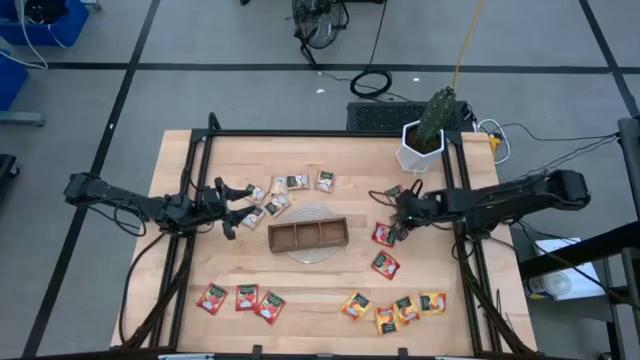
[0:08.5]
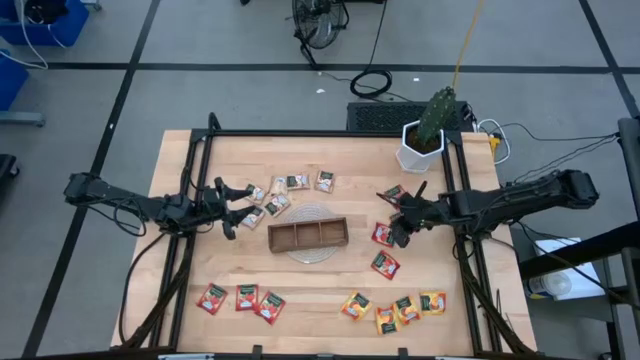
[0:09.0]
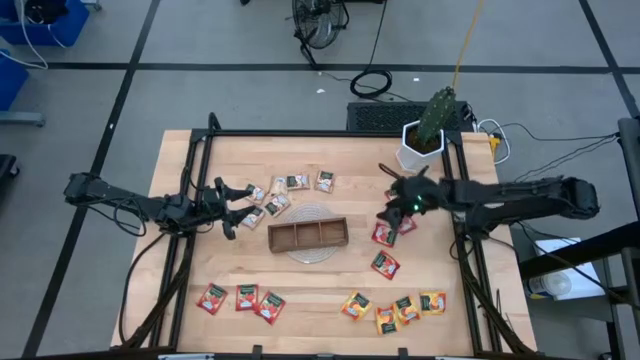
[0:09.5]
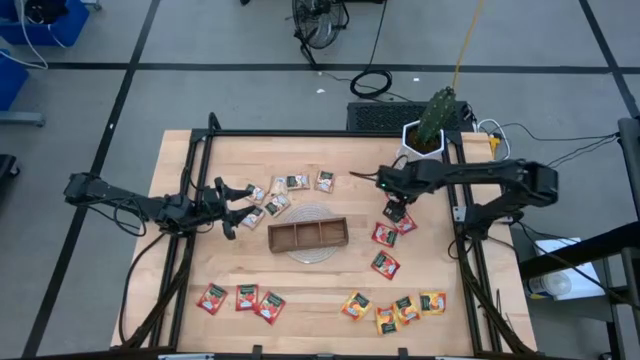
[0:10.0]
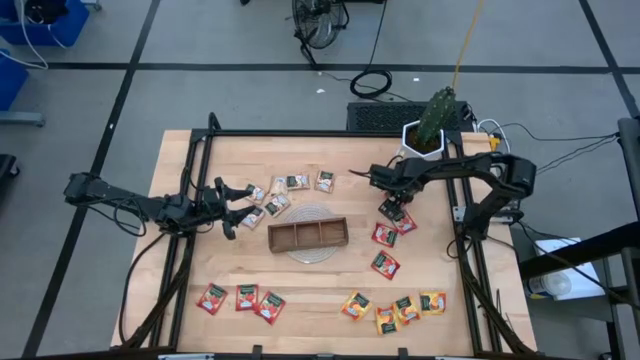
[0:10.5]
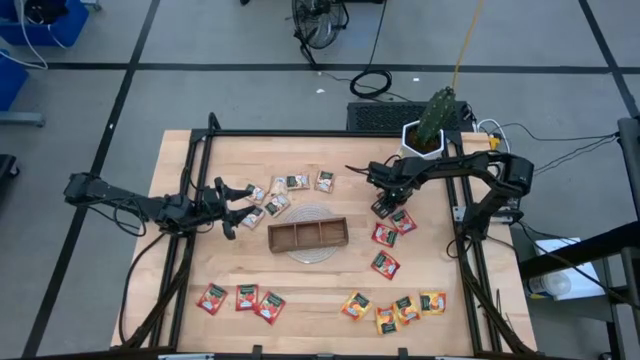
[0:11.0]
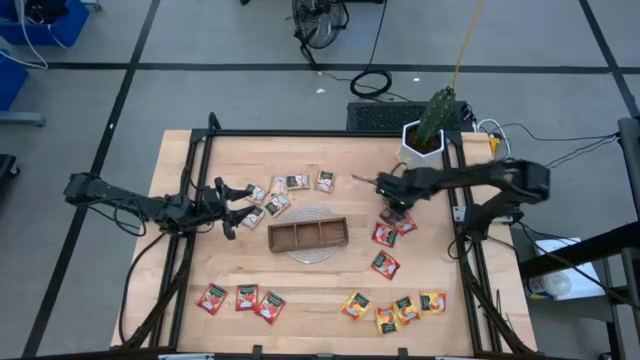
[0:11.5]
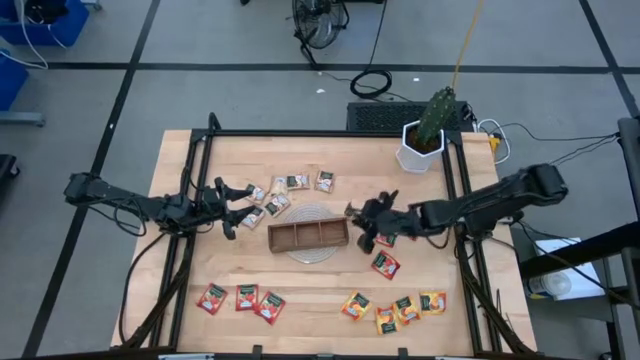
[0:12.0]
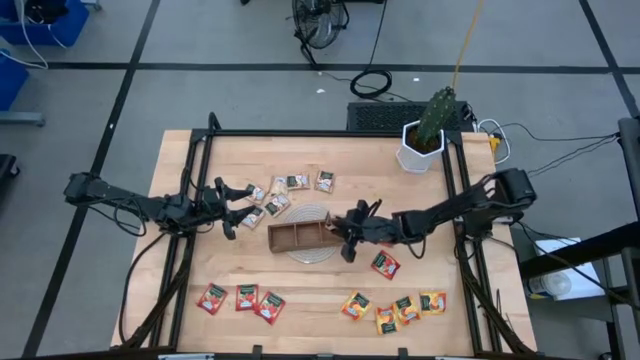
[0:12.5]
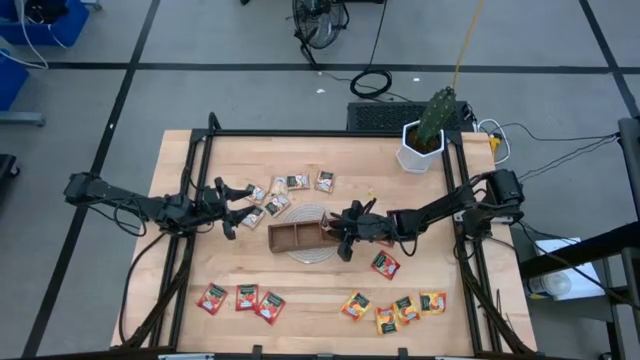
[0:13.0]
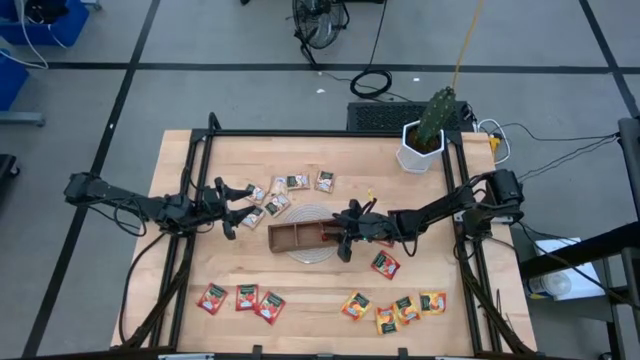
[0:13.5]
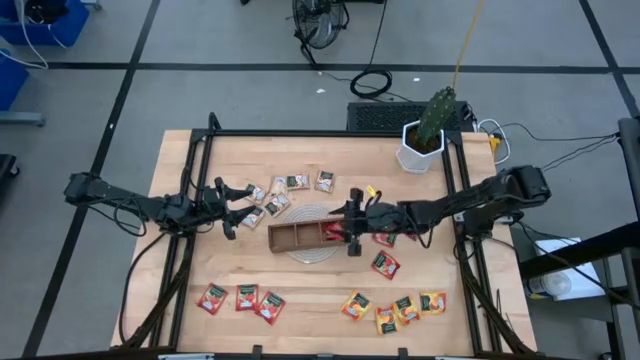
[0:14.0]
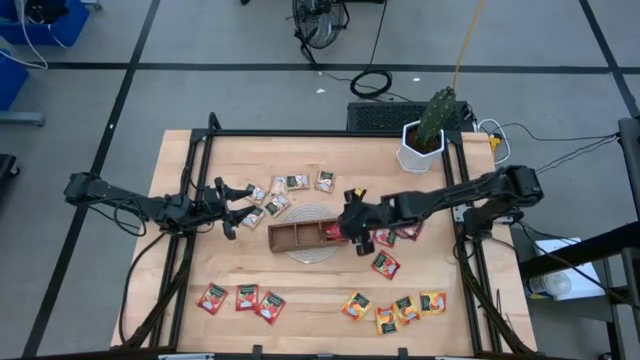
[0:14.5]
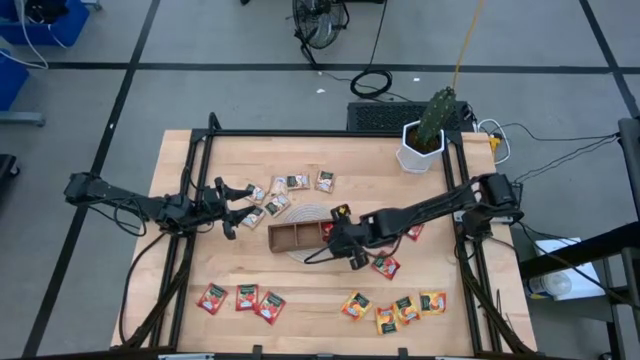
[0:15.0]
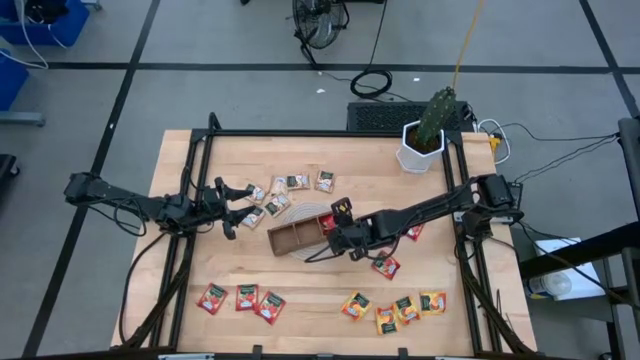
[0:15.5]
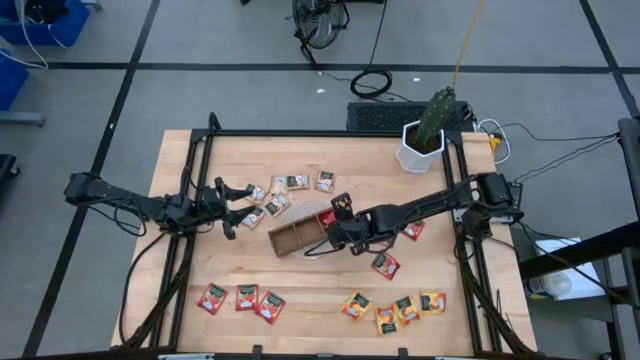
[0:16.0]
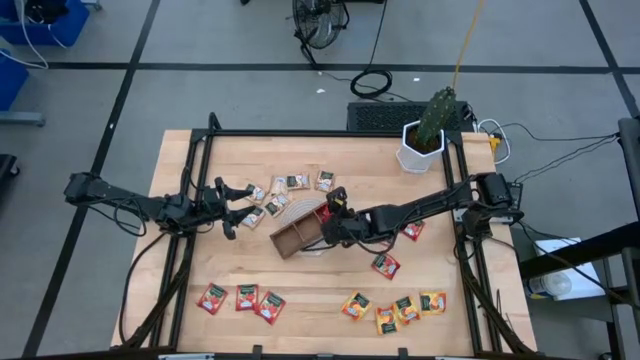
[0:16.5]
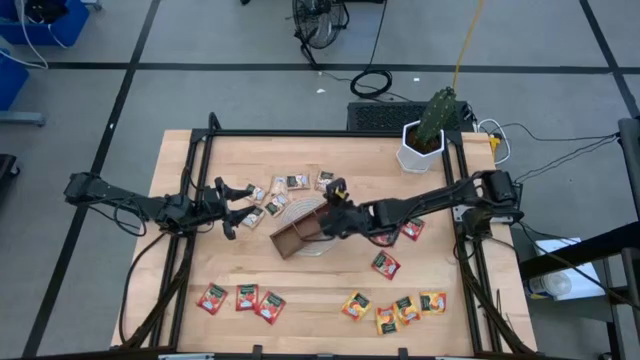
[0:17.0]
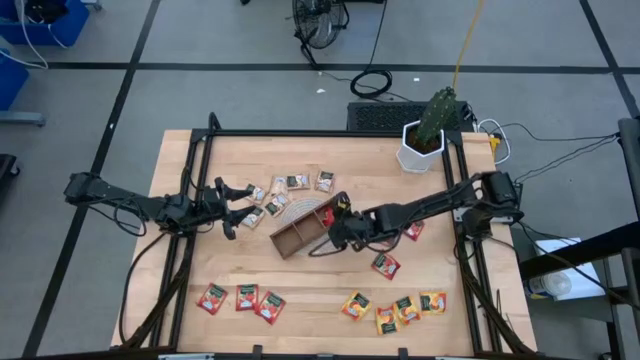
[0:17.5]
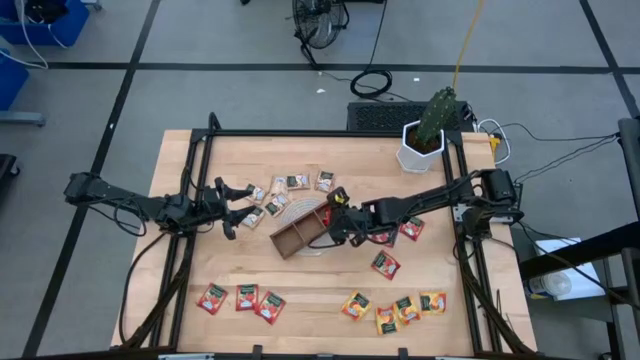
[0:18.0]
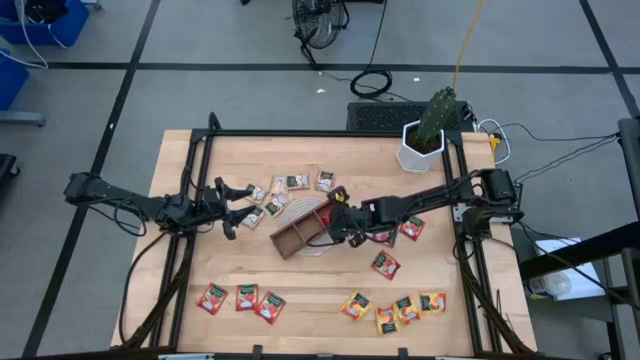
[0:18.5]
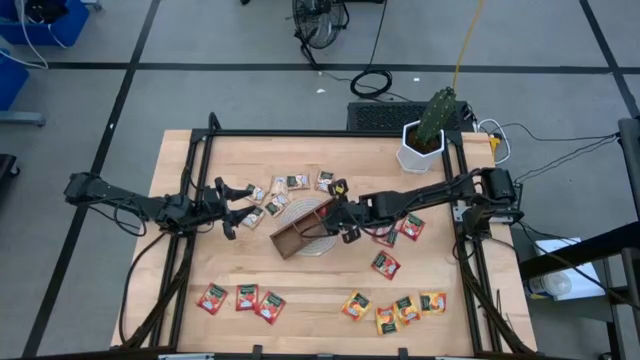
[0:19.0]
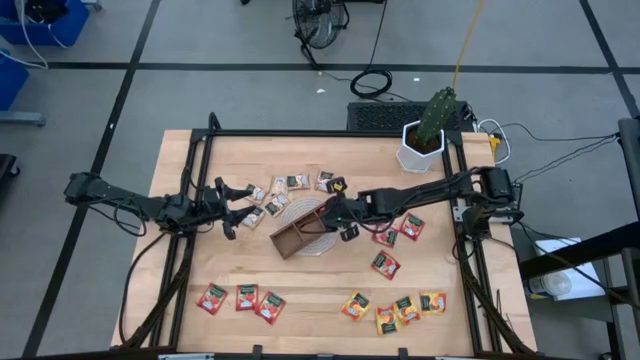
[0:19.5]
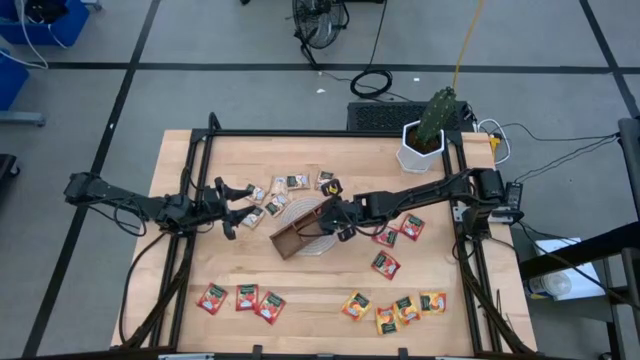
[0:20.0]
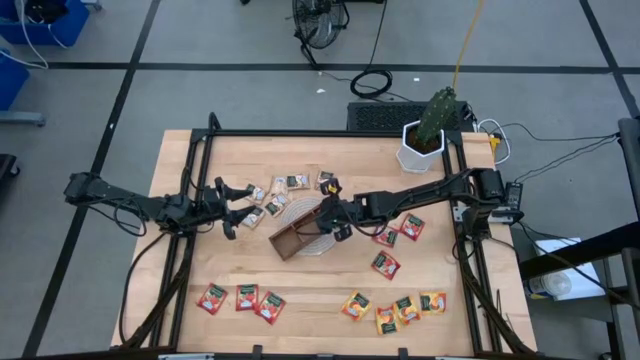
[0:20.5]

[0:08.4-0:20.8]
Task: Pick & Place Tea
Put the red tea bag into the right section of the wood organizer

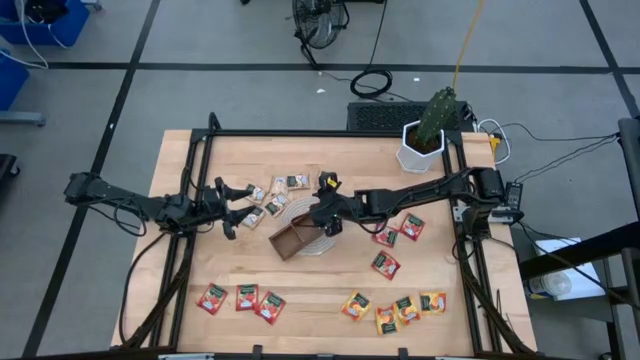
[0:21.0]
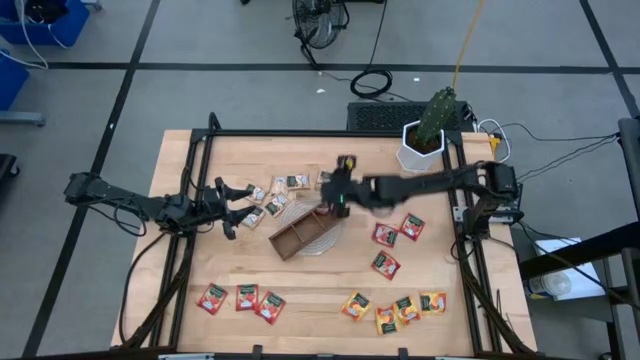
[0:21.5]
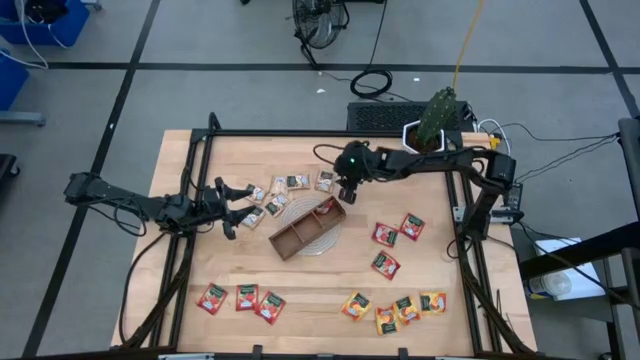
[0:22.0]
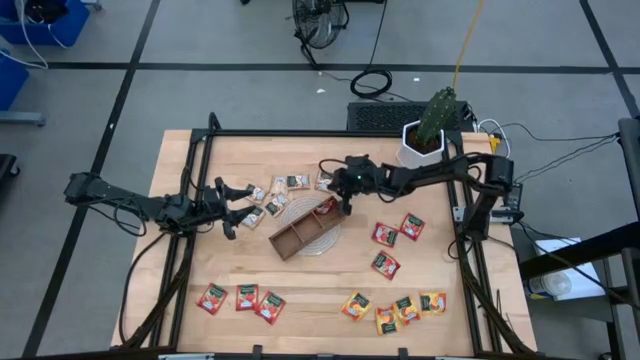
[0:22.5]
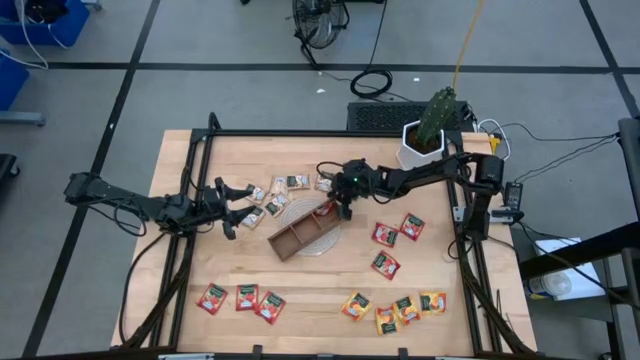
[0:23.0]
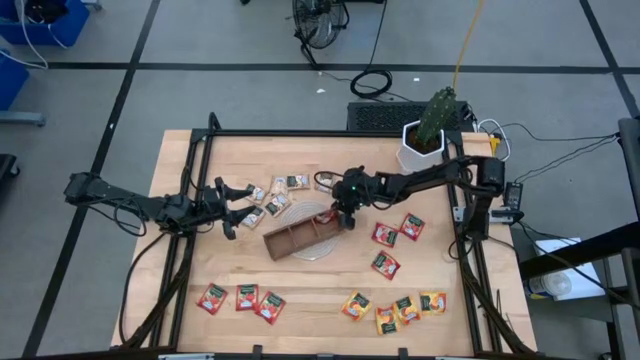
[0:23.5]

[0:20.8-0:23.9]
Adjust the wood organizer

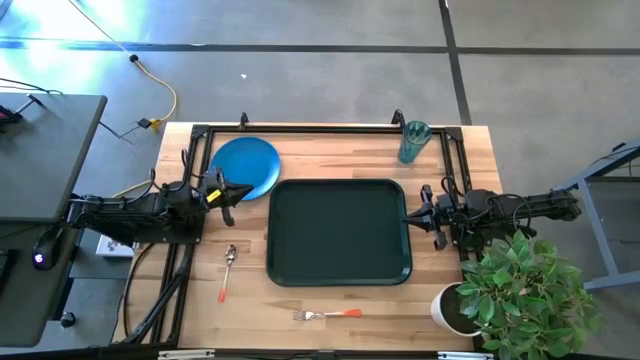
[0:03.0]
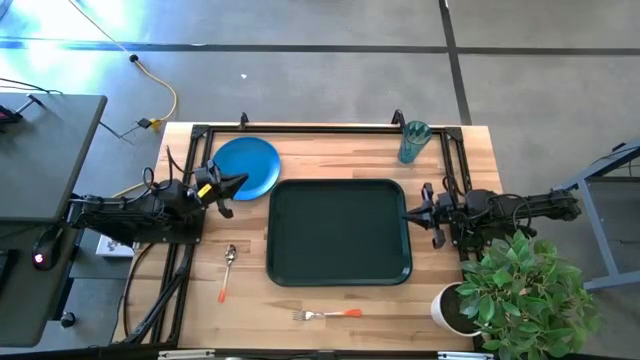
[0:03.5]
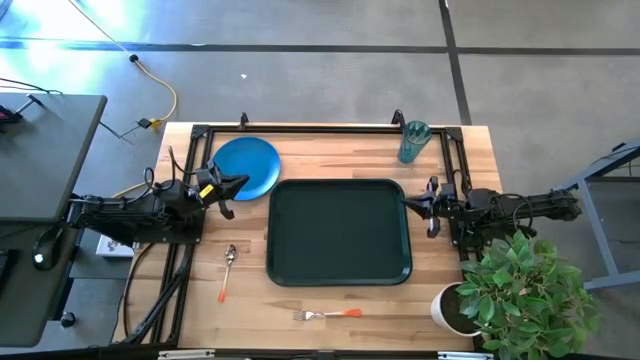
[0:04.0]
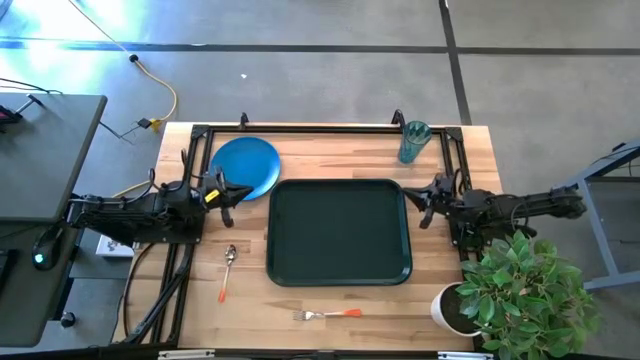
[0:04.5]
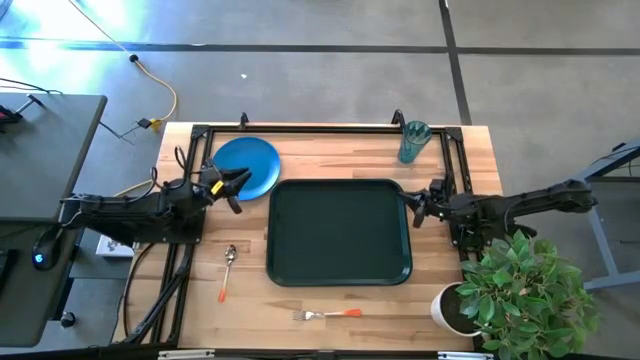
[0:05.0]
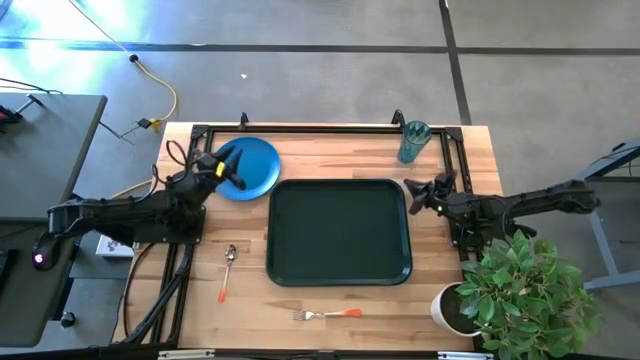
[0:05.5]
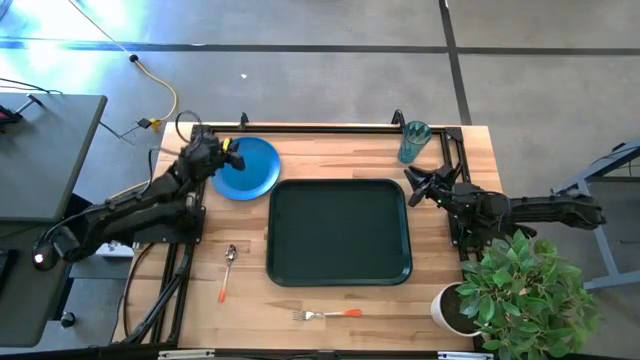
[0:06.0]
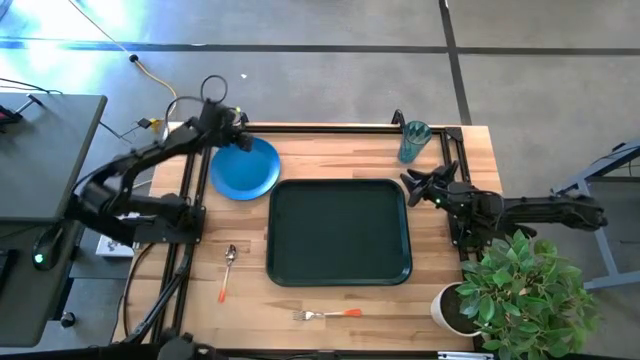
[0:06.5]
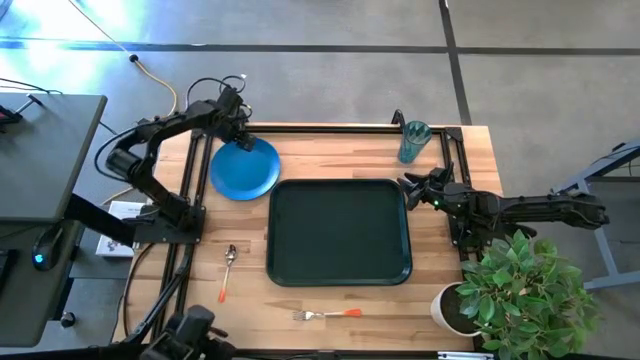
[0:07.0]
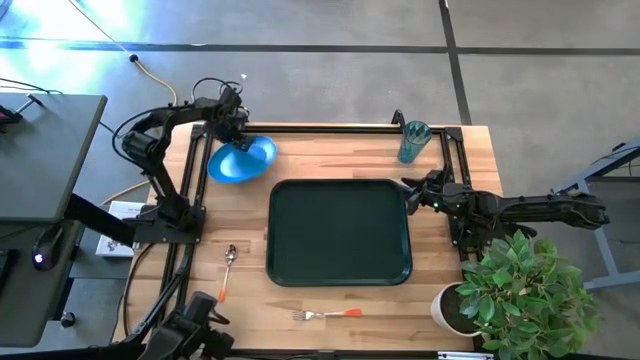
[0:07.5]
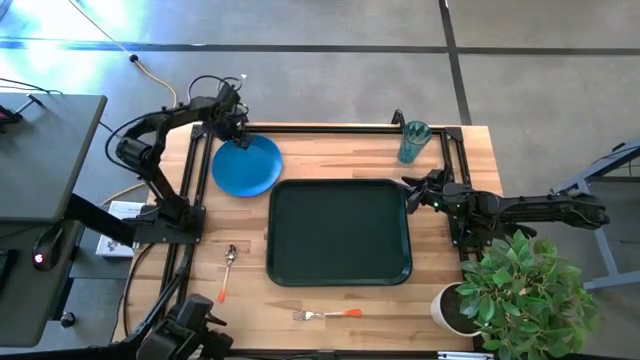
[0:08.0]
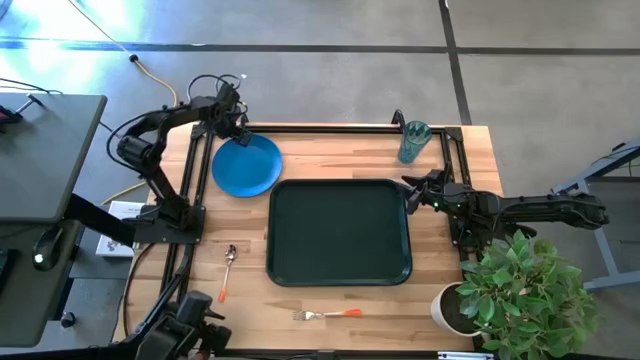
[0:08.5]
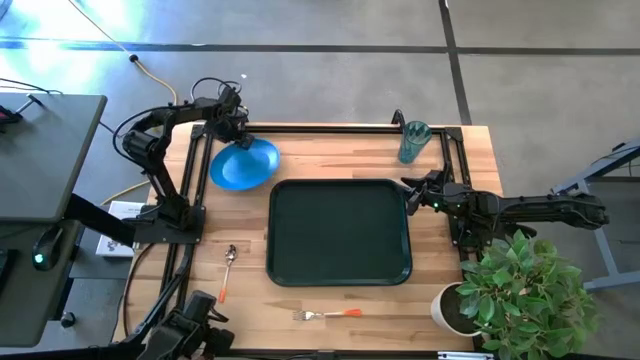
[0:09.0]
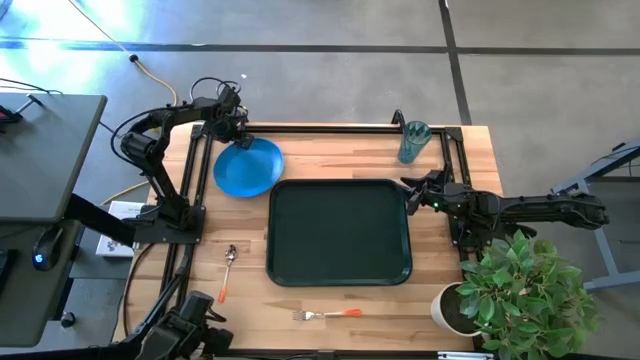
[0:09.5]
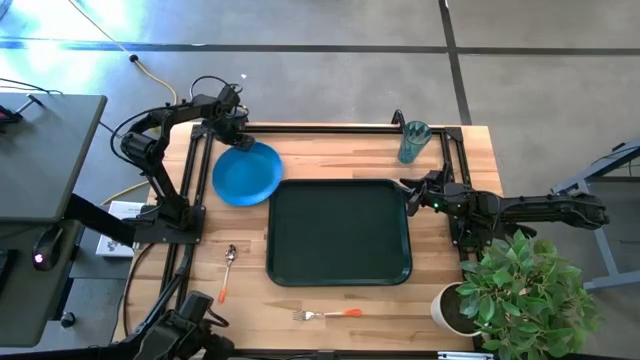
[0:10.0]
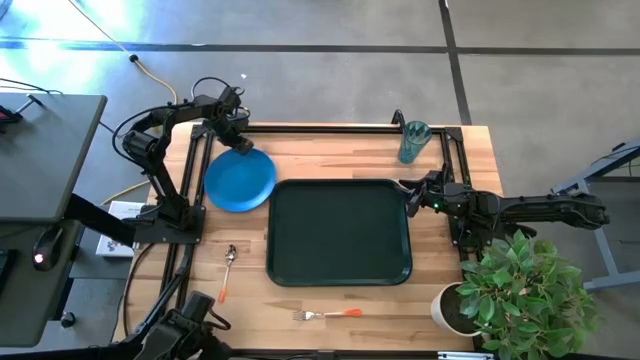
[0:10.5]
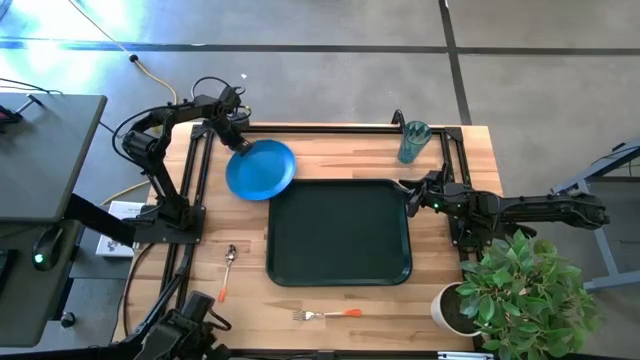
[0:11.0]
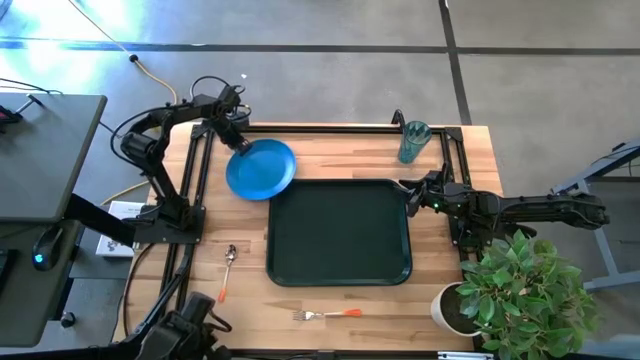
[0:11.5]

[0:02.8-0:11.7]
Task: Pick and place plate/cup/fork/spoon on tray
Put the blue plate on the black tray
